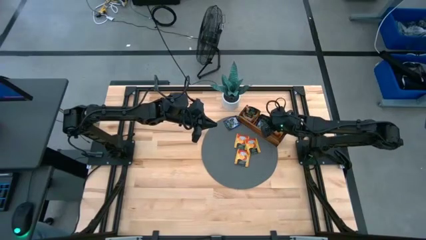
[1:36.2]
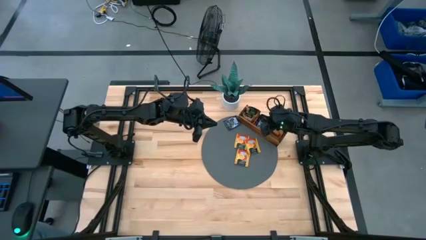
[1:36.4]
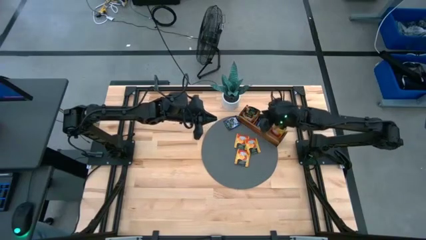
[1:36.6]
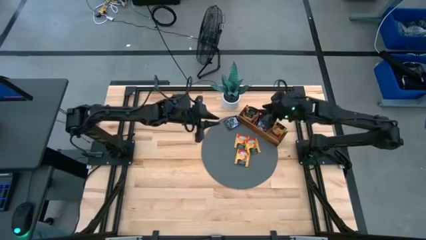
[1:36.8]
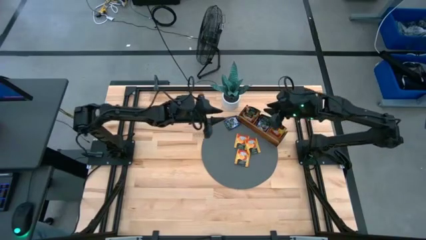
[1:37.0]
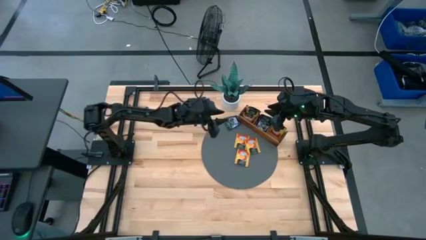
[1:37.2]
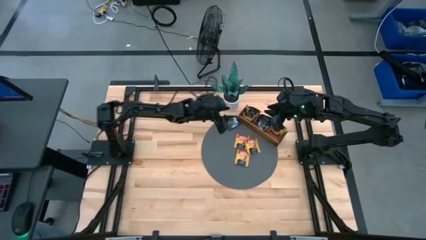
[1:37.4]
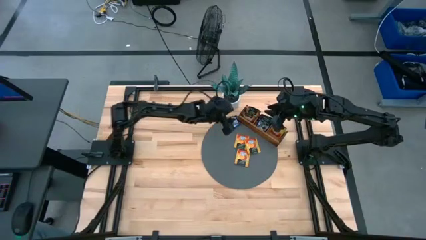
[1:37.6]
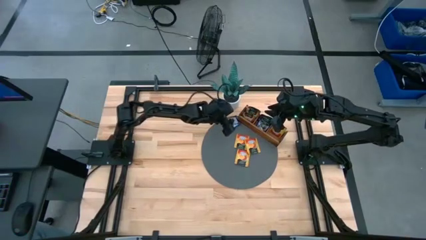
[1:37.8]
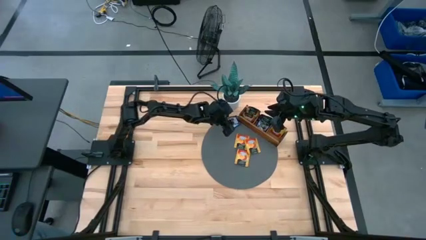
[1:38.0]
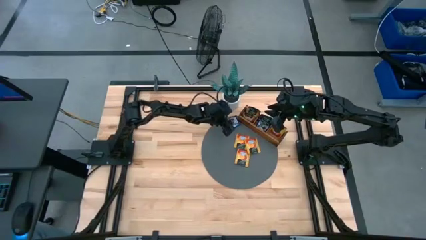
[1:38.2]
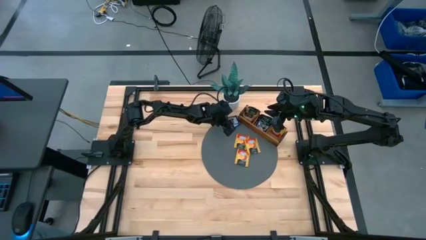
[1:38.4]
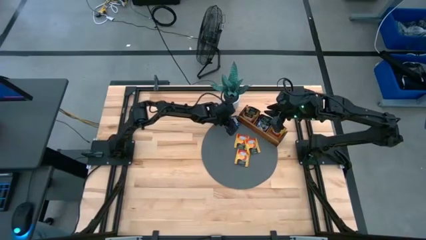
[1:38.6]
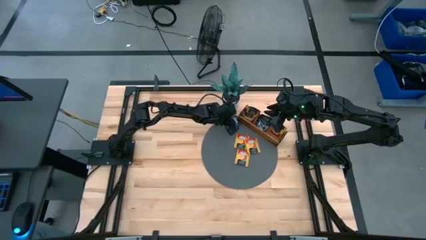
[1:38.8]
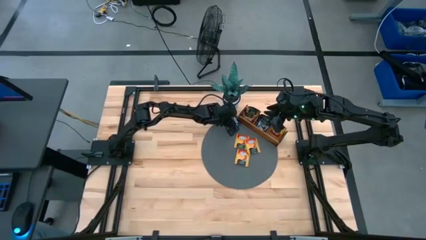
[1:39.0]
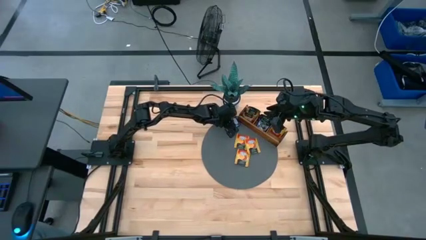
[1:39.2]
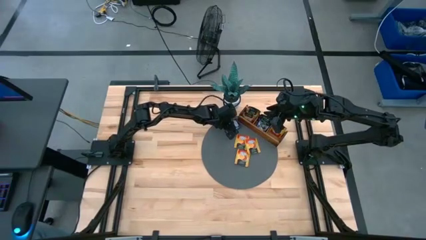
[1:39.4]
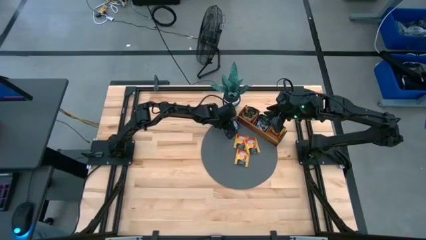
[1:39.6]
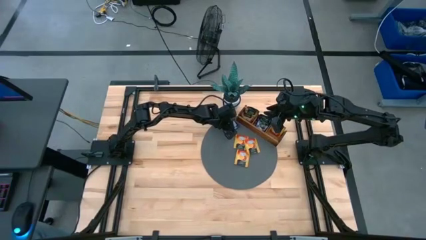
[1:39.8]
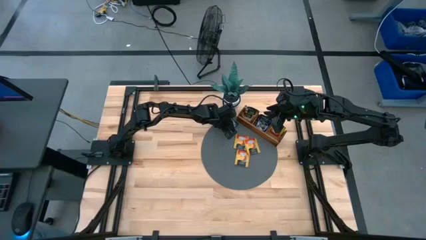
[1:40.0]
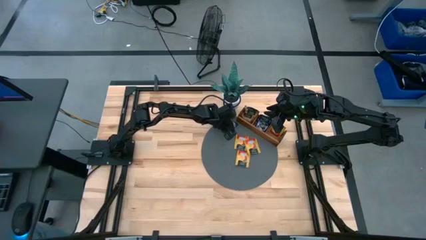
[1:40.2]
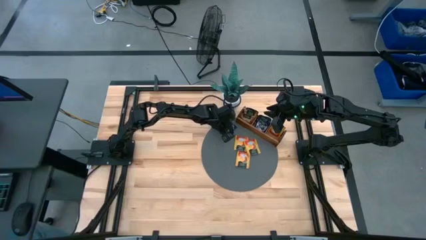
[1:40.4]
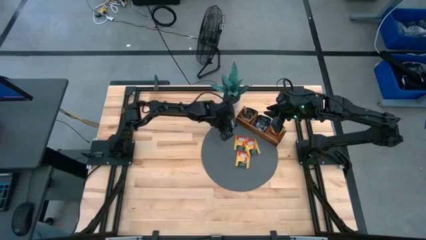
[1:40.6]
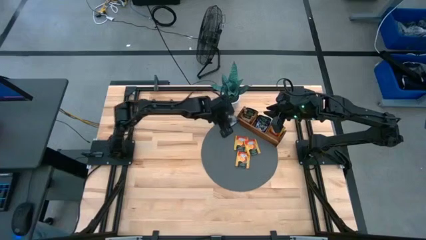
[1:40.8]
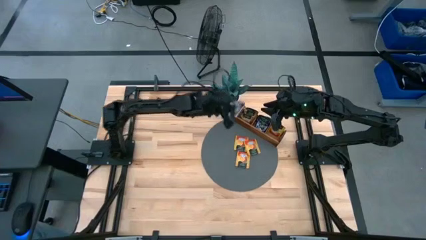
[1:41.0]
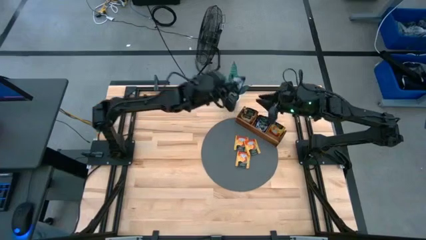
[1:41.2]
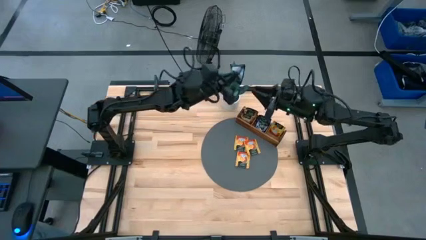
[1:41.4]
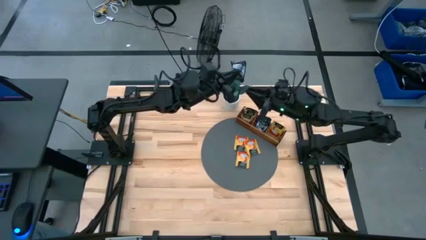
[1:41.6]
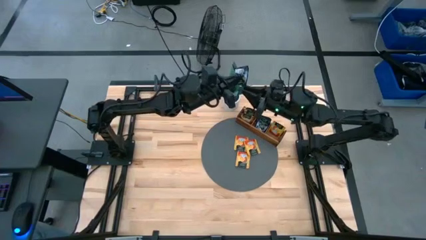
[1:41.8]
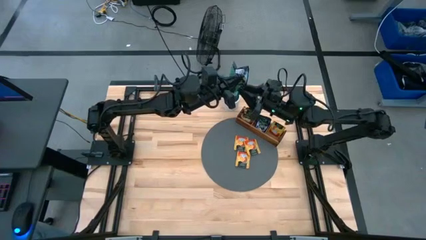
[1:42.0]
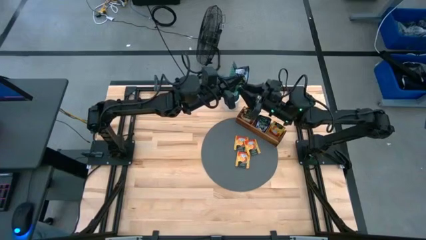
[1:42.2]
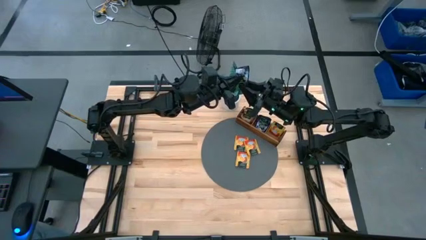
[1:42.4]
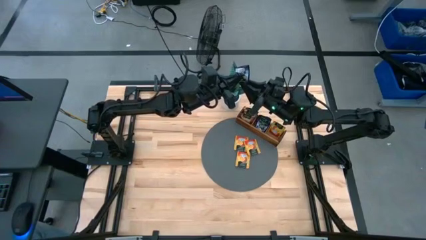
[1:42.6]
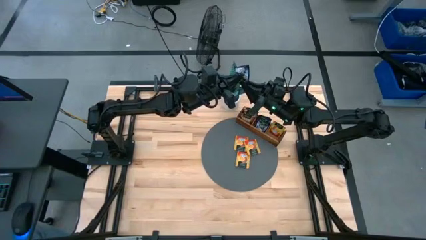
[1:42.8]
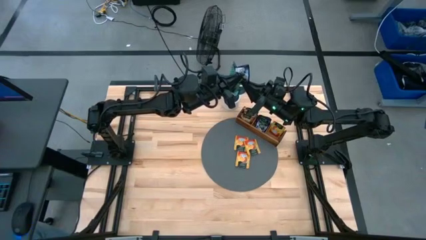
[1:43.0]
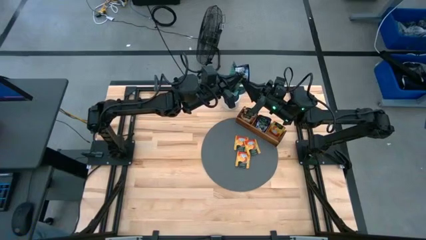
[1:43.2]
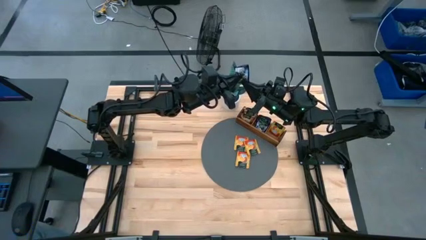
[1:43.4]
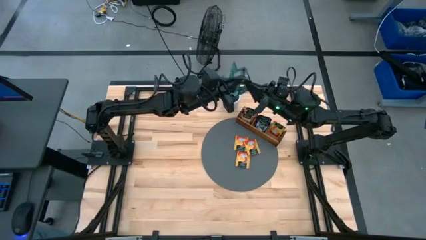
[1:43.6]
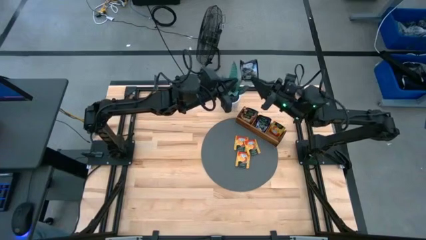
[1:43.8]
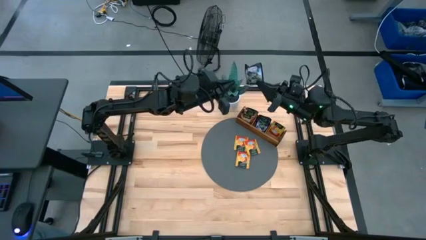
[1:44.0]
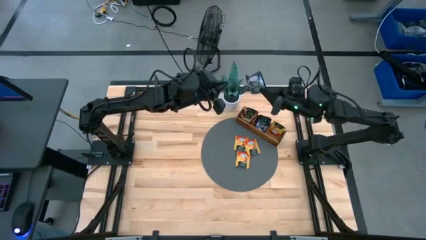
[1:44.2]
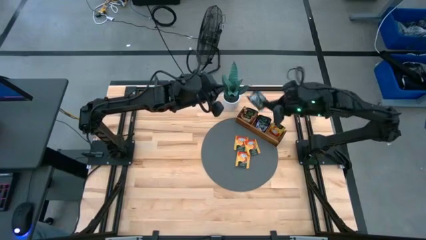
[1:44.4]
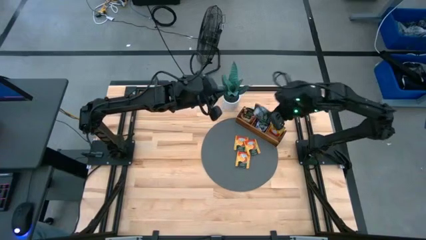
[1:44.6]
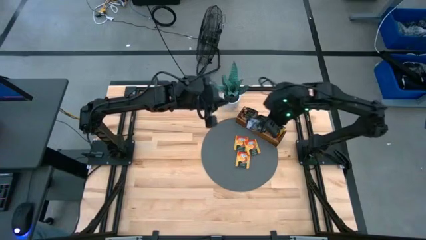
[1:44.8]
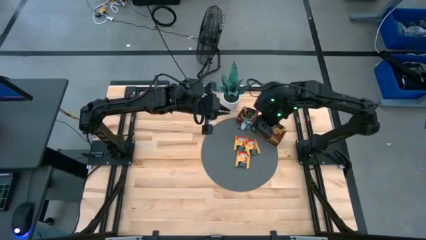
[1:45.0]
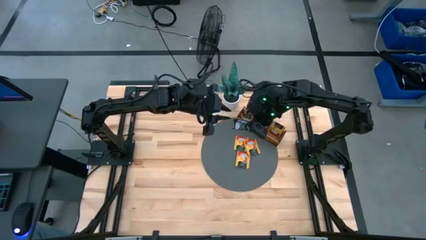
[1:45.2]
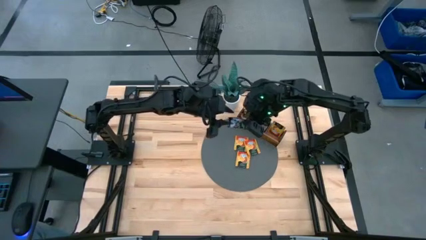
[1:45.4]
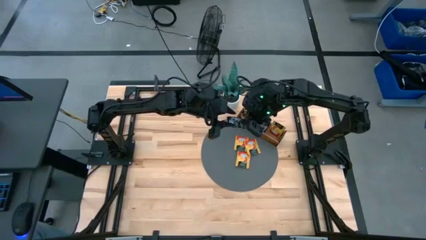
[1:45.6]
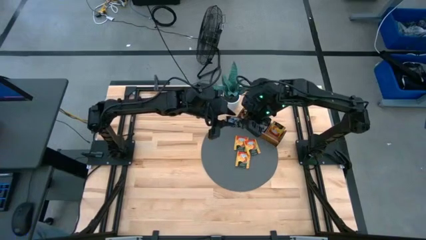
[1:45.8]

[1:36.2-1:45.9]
Task: Pick & Place Tea
Put the purple tea bag into the wooden organizer

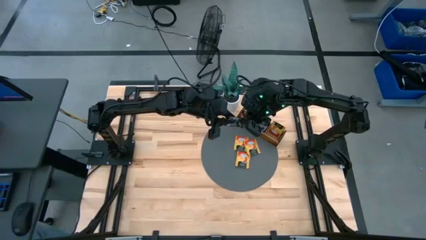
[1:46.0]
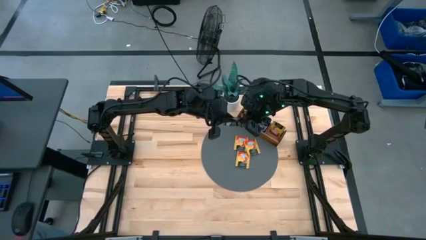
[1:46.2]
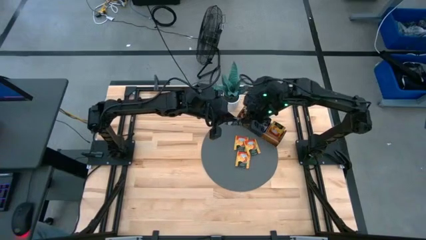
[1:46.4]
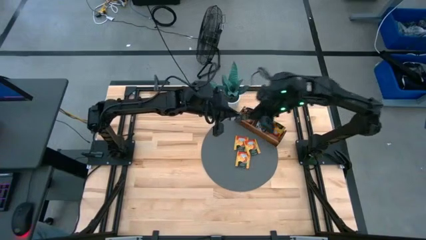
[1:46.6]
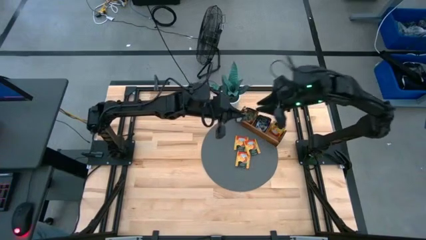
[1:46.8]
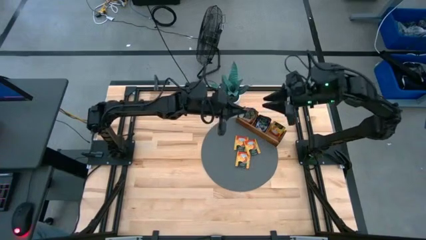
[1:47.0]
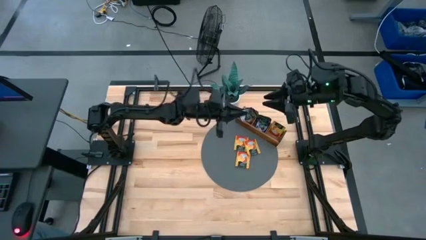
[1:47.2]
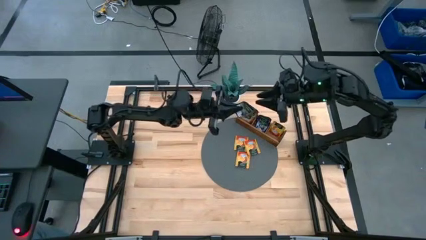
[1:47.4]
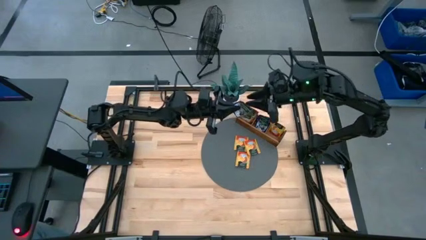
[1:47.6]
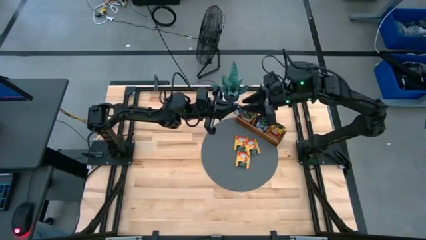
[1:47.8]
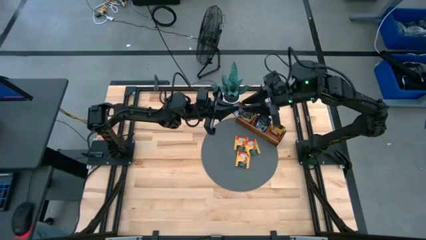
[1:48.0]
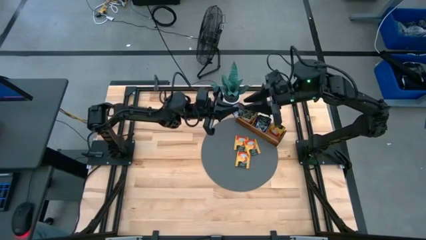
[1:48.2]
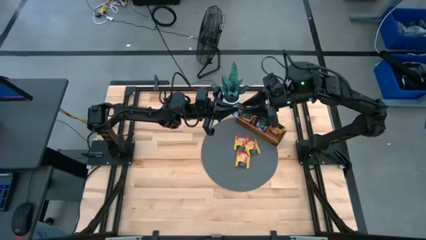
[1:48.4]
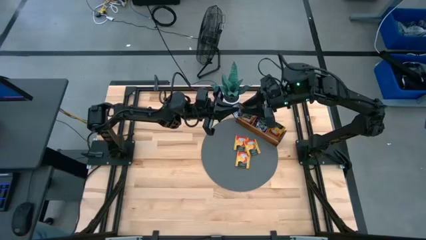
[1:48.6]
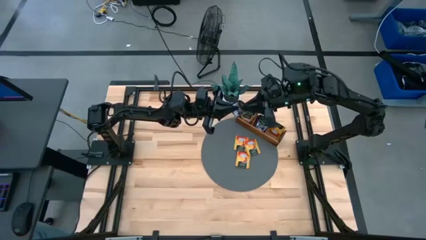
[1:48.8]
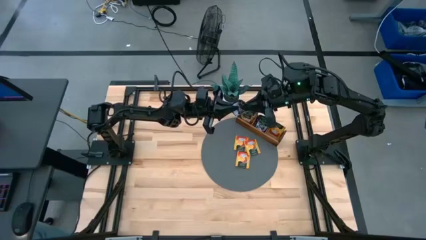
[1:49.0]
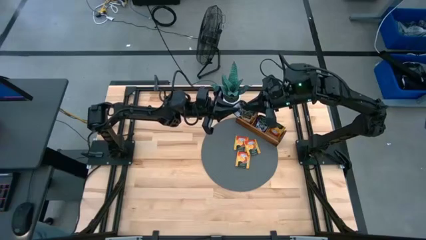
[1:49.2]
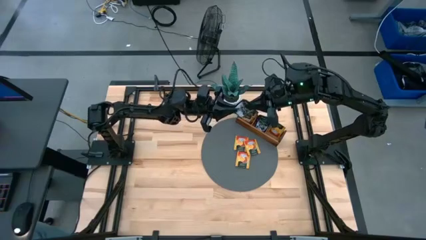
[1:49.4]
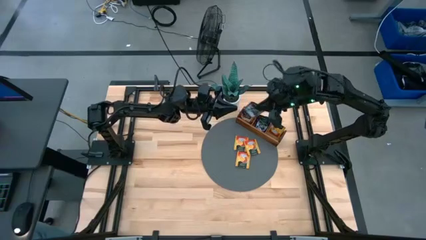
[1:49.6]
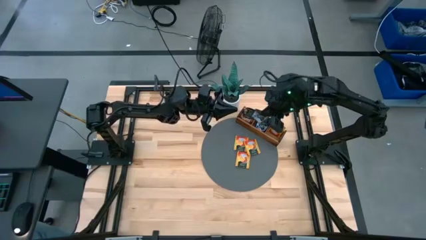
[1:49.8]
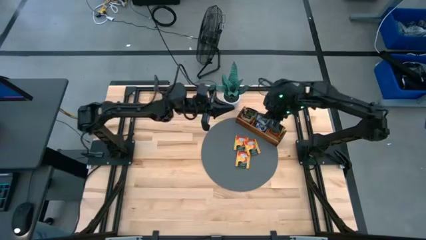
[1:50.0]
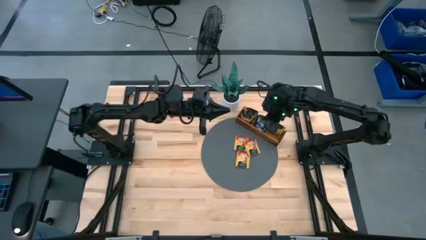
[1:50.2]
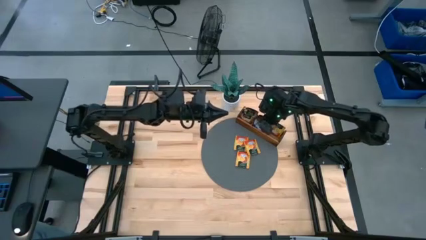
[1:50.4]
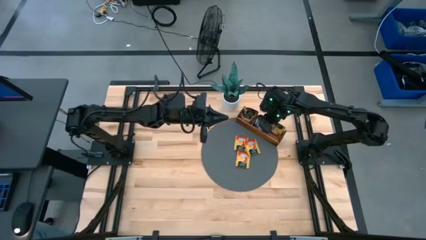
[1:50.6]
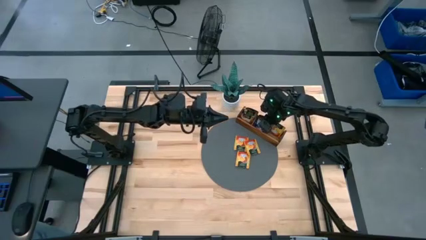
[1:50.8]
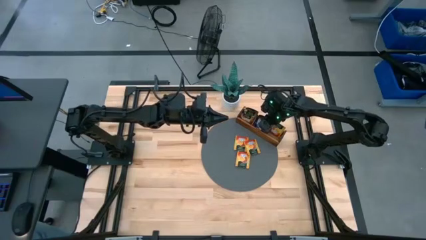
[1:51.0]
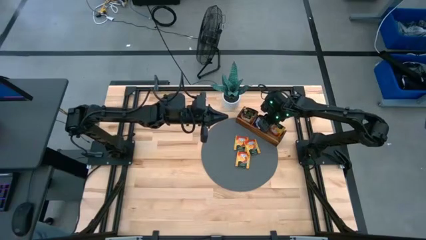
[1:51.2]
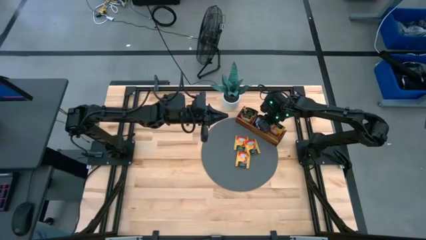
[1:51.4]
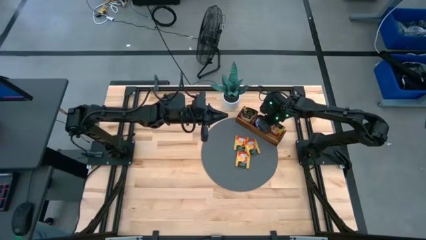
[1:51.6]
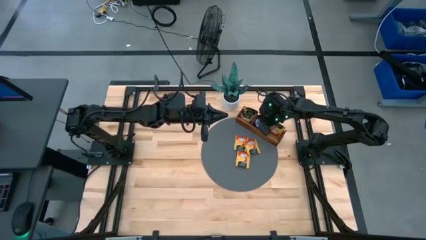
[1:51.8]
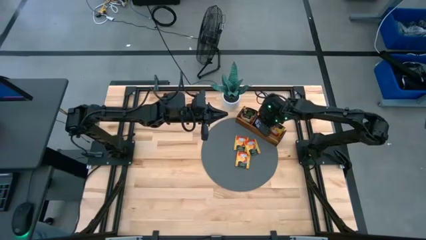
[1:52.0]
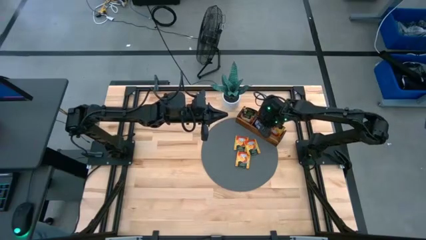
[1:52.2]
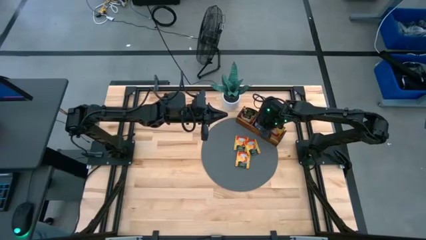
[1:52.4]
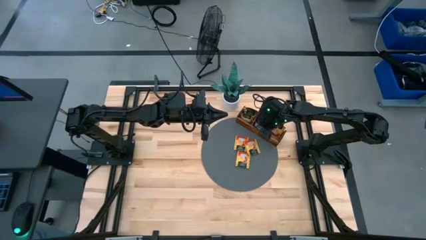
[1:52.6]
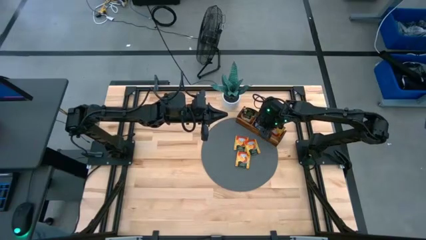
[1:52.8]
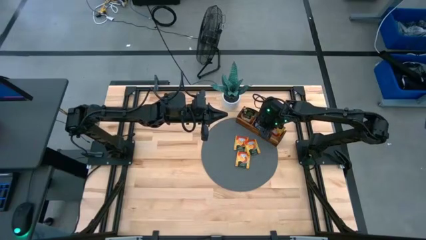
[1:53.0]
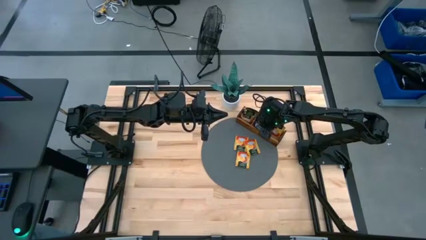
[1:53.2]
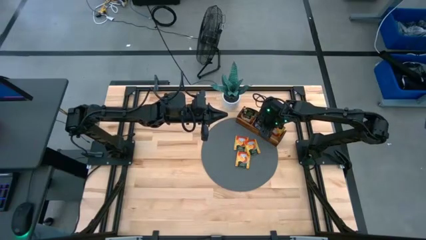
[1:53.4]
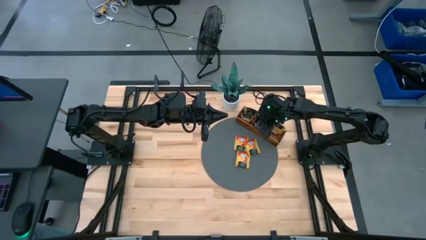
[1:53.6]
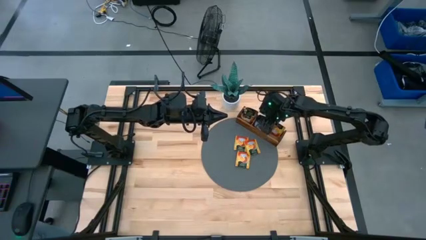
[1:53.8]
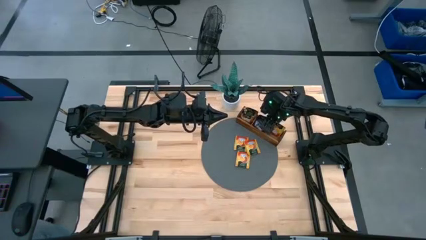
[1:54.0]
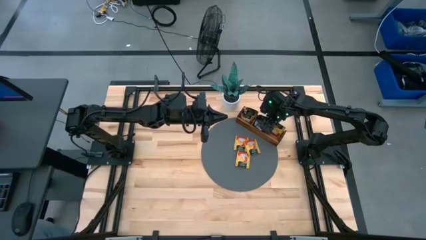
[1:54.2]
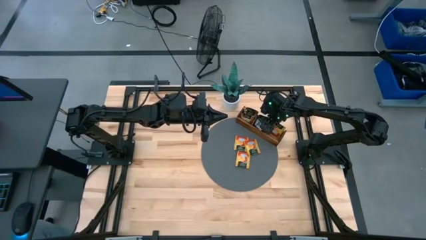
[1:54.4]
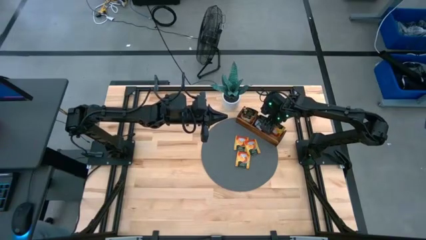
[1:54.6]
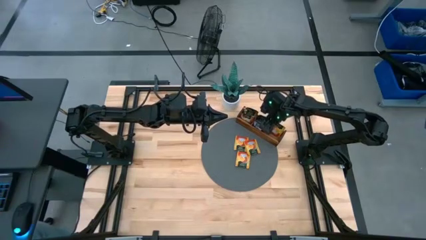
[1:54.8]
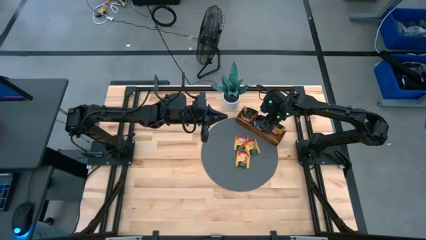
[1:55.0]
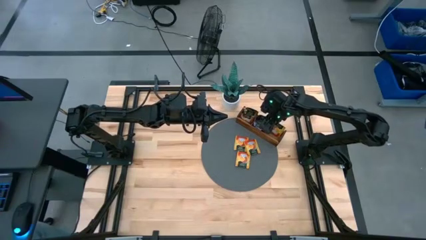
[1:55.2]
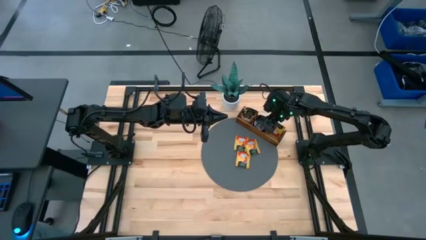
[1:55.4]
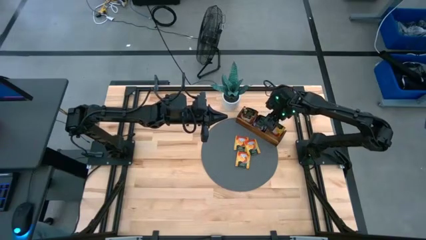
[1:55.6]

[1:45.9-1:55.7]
Put the purple tea bag into the wooden organizer
